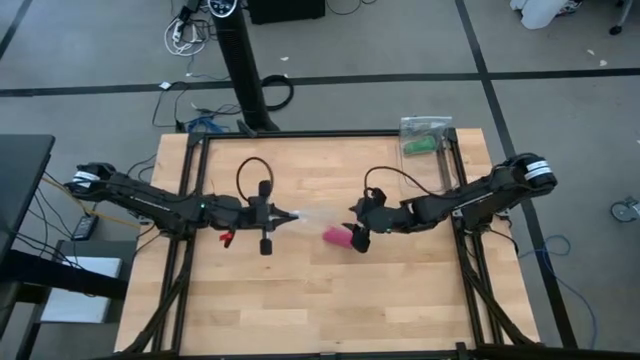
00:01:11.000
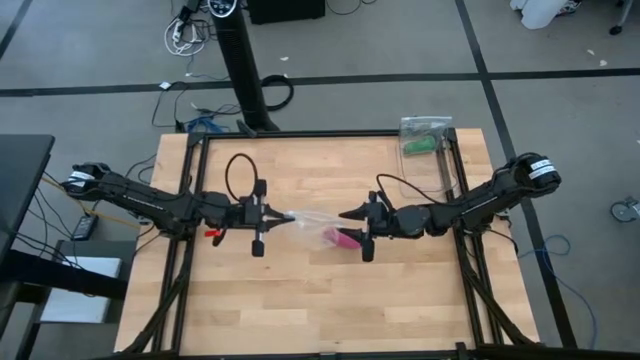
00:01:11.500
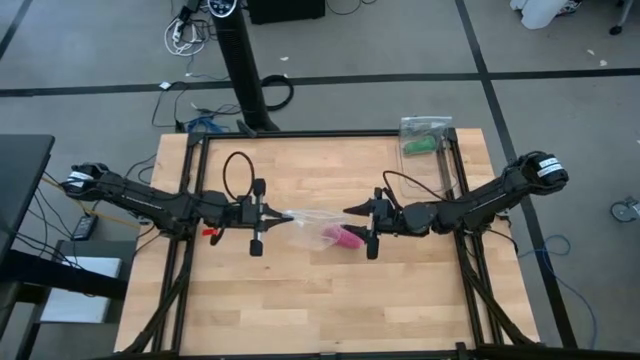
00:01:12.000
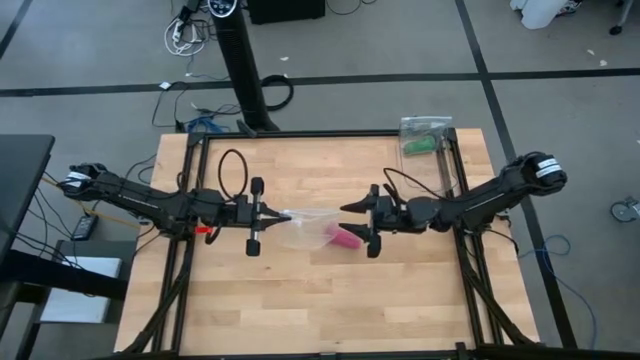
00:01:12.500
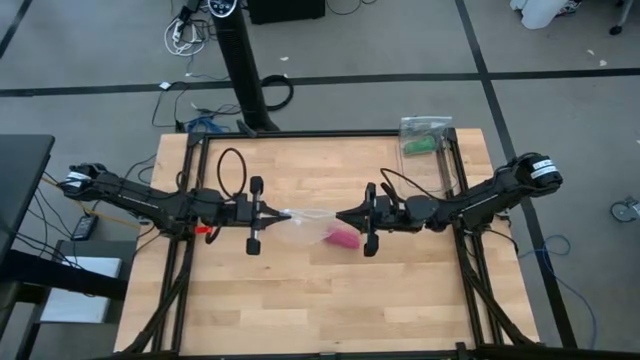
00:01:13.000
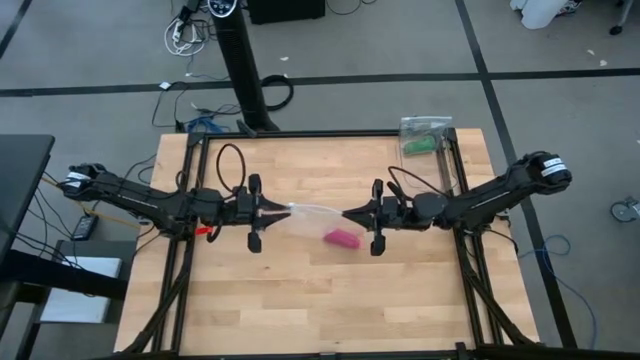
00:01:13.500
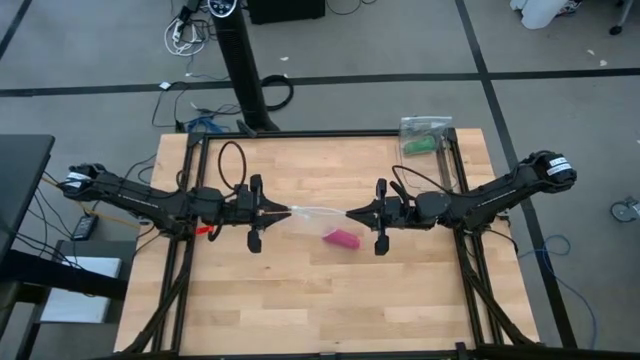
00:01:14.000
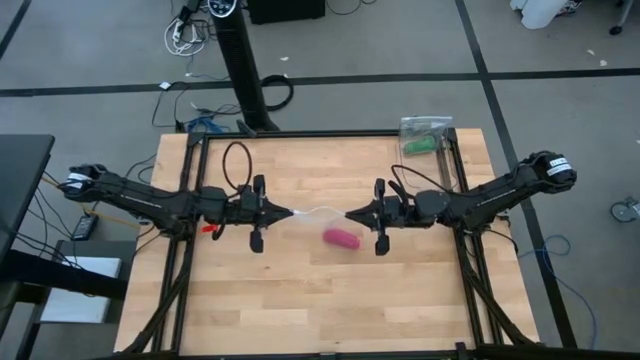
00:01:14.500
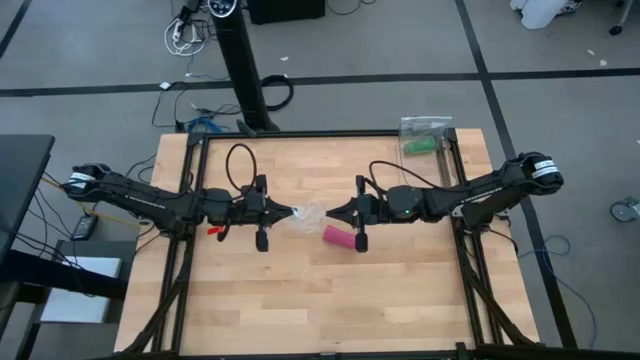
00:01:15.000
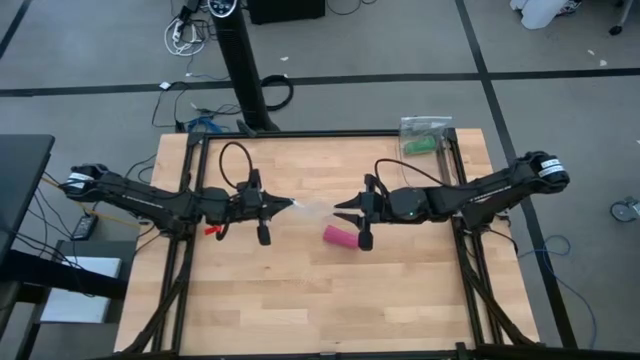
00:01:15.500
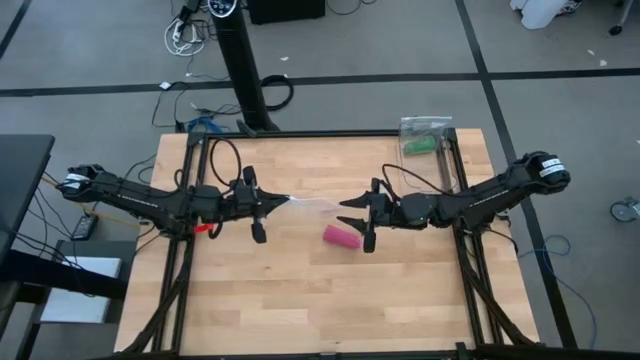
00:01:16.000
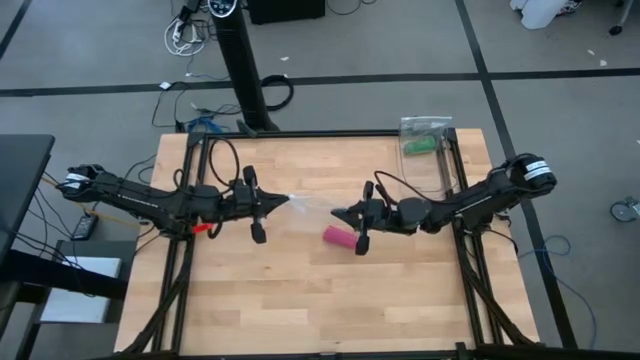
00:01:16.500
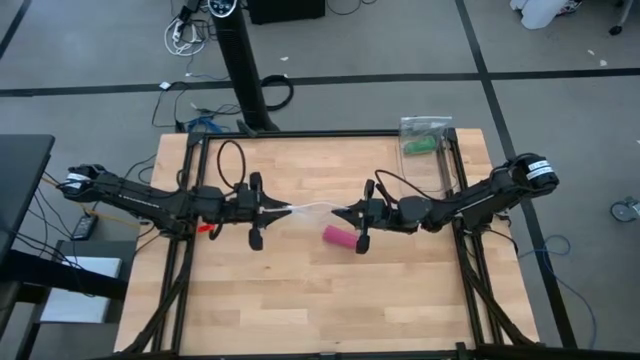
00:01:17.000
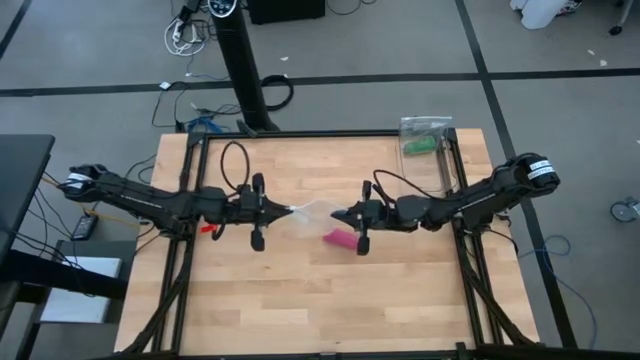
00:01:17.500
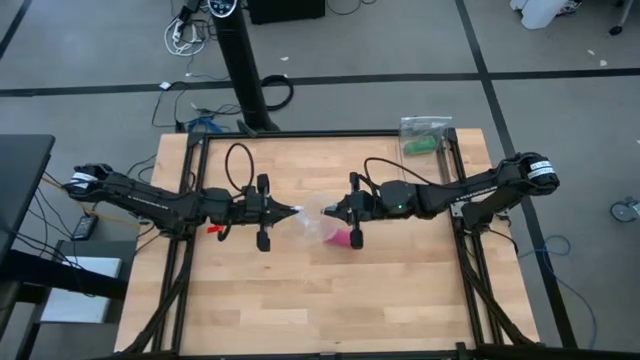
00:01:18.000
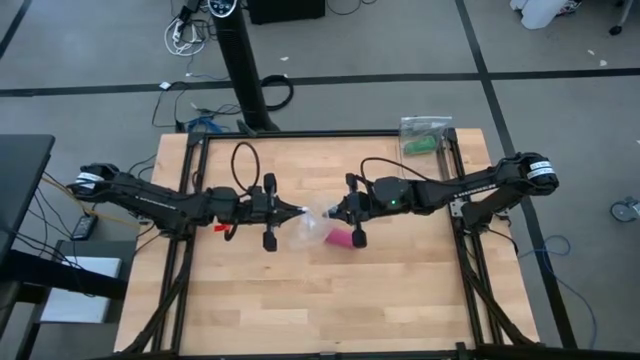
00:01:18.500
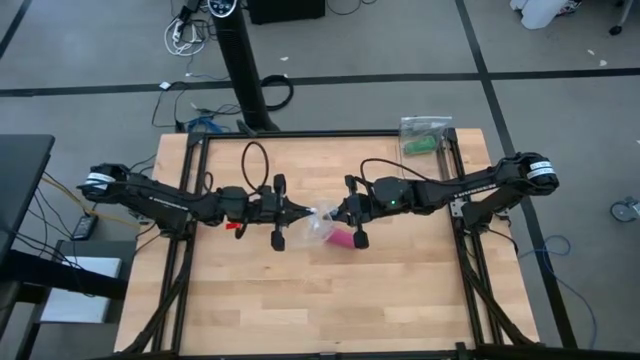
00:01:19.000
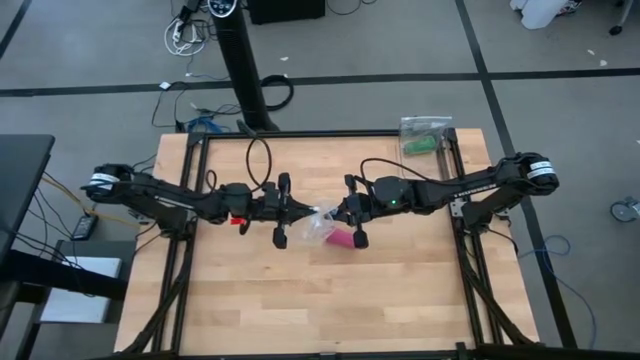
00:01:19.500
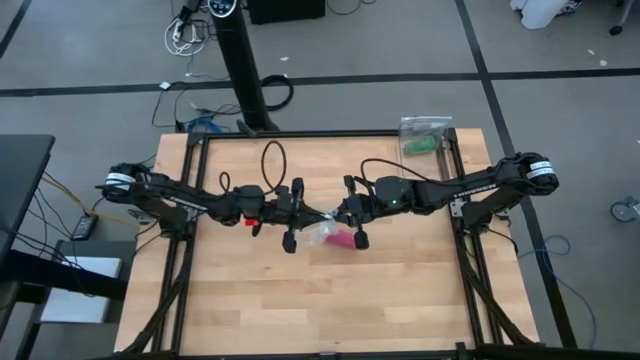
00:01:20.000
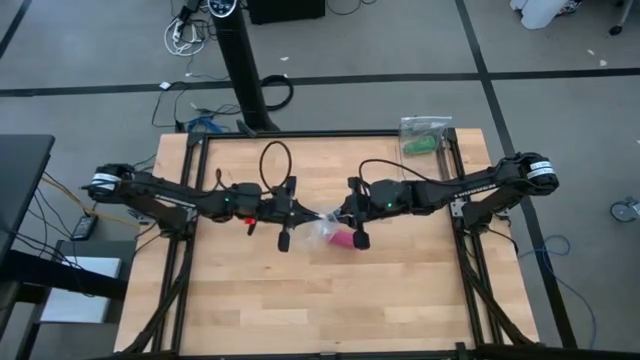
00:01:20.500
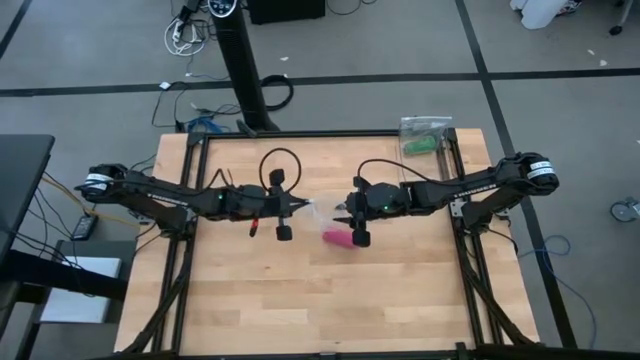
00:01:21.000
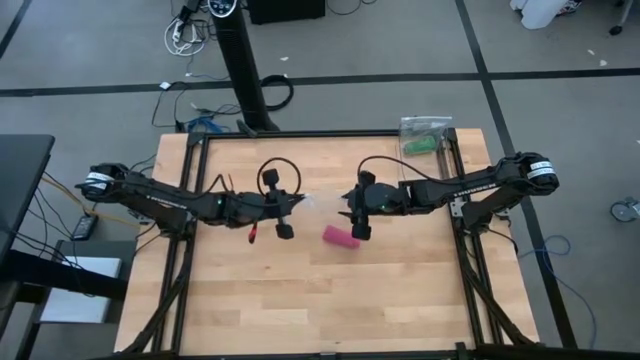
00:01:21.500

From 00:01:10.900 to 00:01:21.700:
Task: Roll bandage
Prepare the transparent zip bag

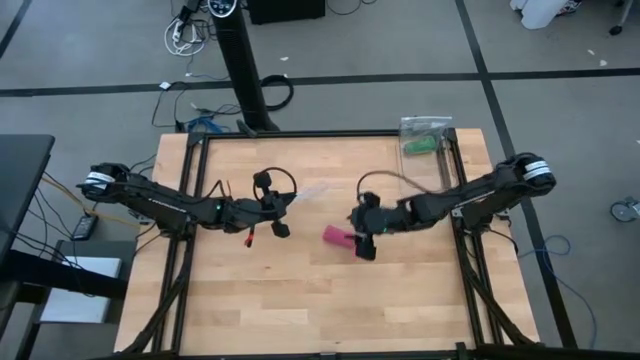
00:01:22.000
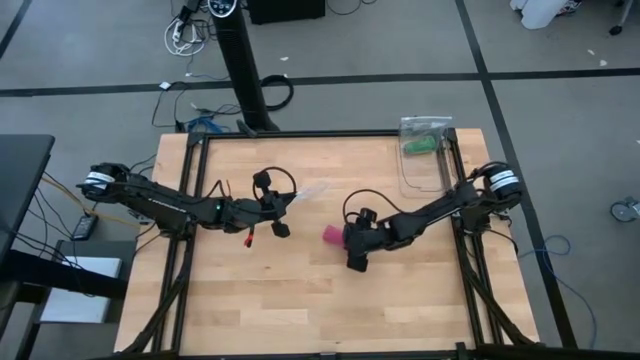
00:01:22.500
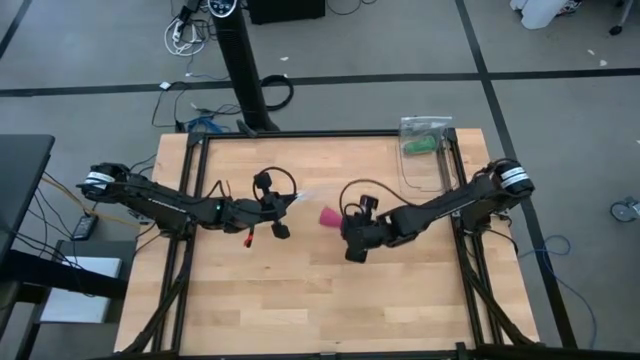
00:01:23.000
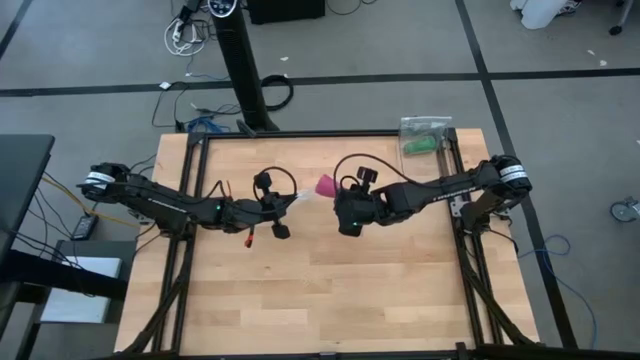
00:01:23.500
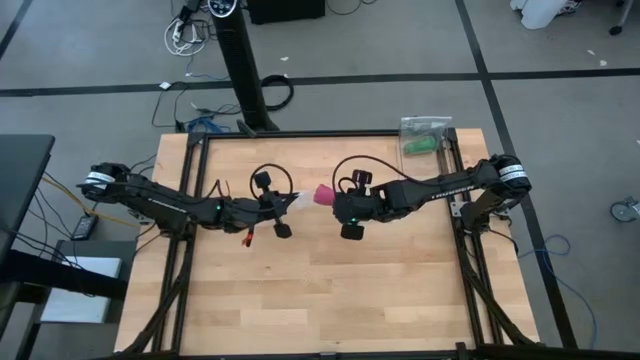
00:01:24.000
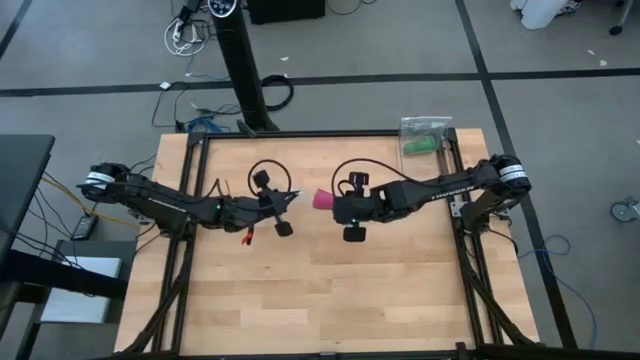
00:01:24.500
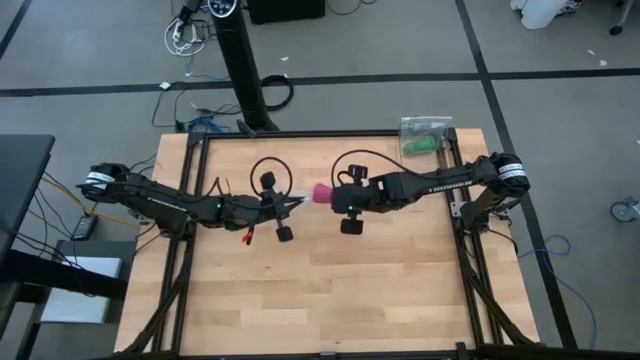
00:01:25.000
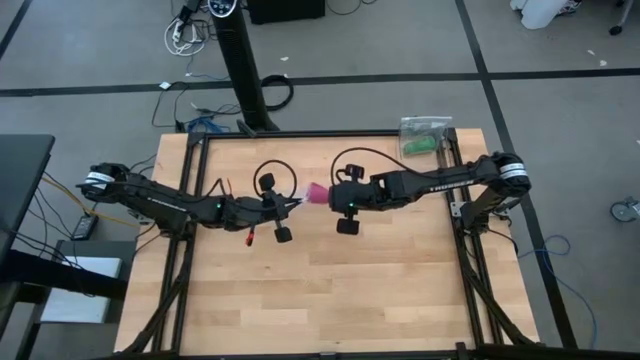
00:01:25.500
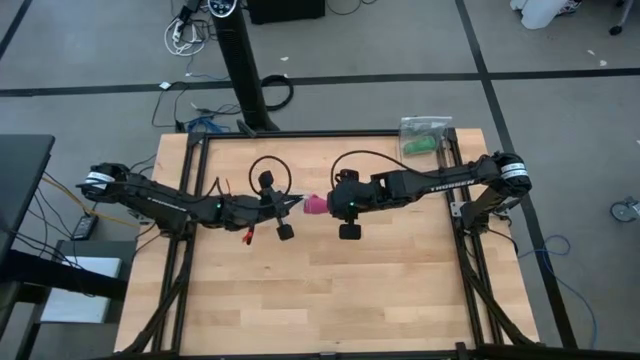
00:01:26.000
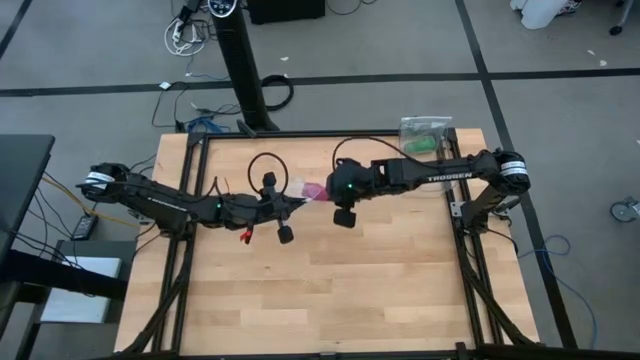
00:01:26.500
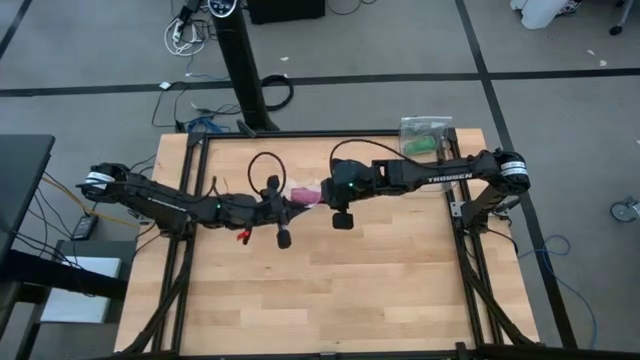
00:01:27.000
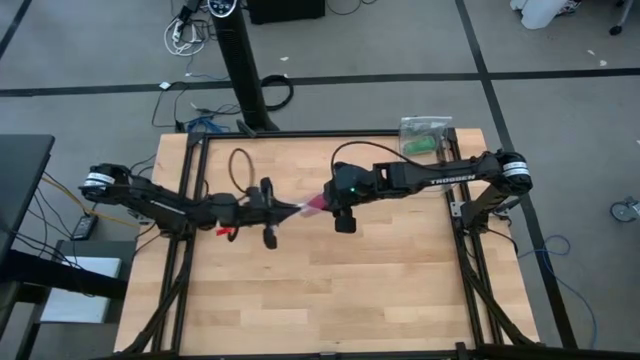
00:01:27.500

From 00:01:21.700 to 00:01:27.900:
Put the pink bandage into the transparent zip bag

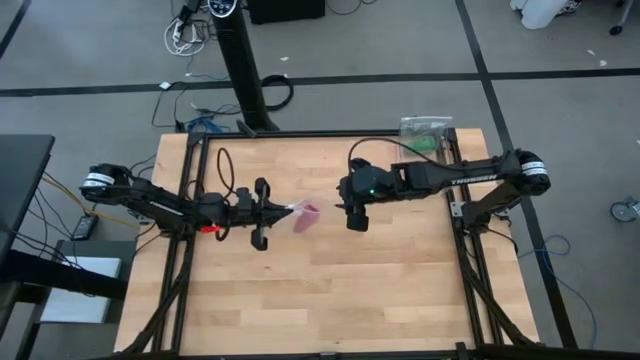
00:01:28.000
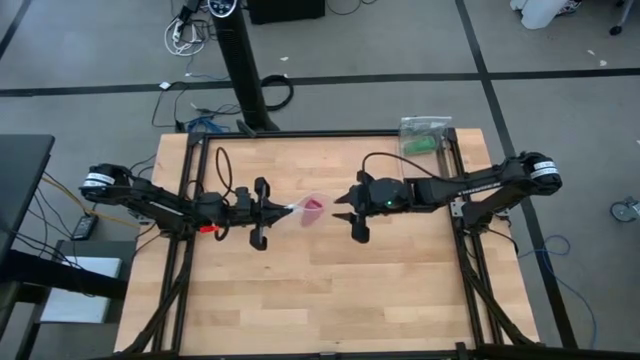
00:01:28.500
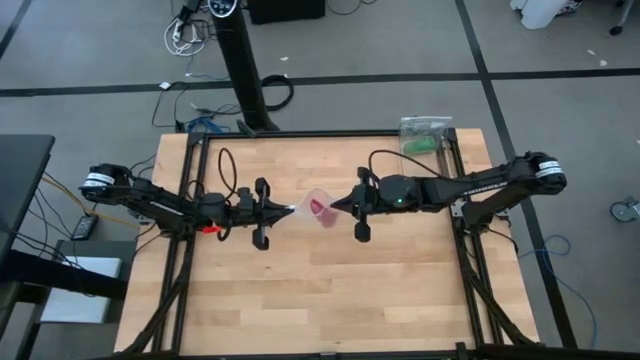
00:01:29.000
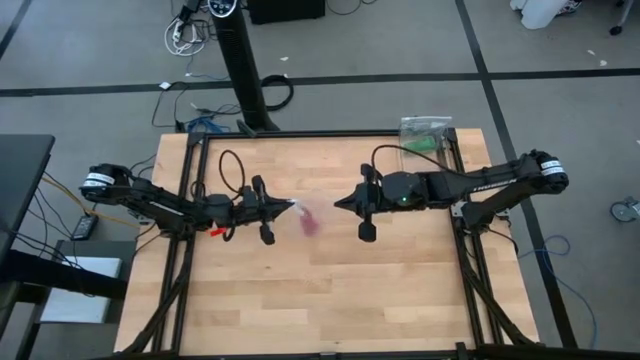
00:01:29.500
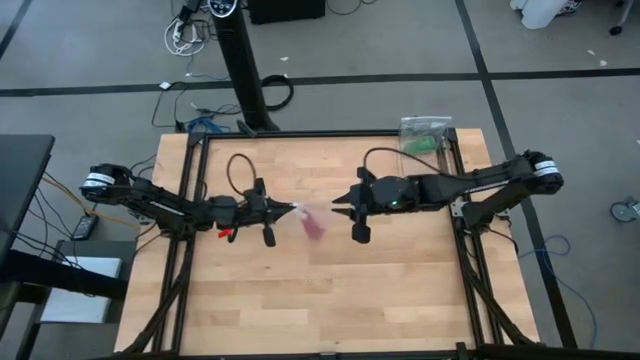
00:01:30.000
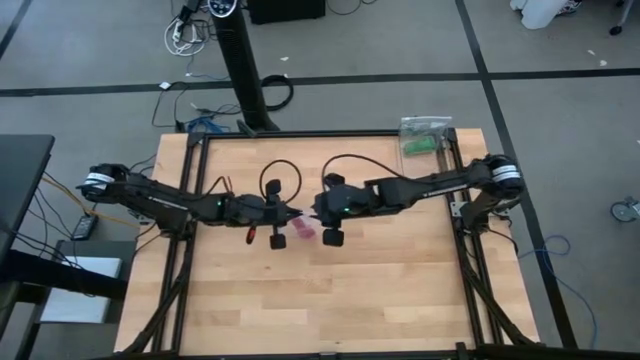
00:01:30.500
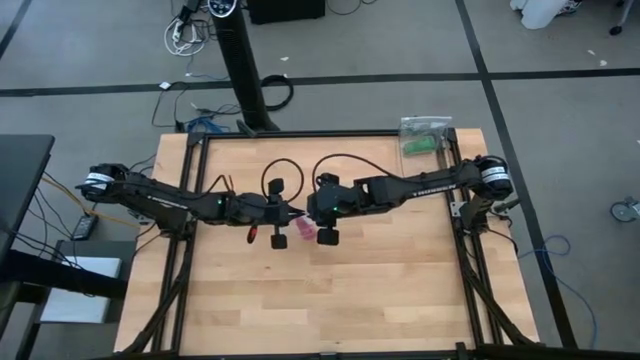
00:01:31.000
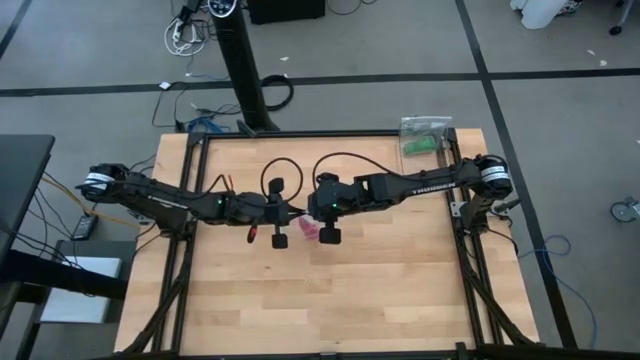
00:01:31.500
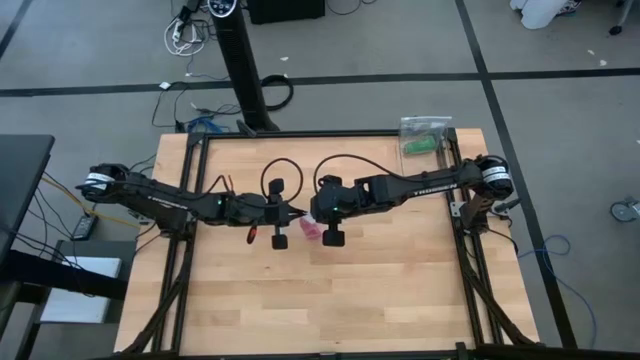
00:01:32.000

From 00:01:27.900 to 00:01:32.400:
Close the transparent zip bag
